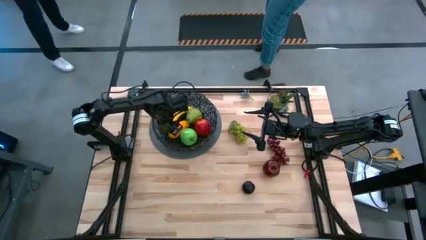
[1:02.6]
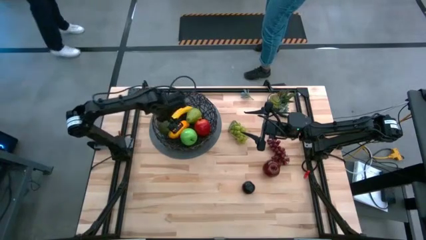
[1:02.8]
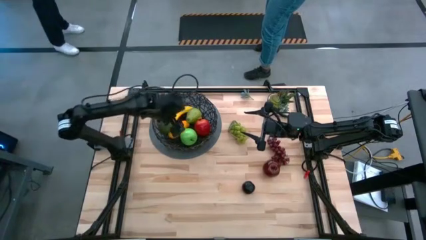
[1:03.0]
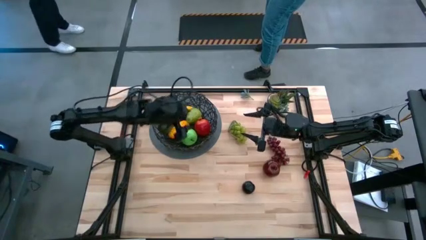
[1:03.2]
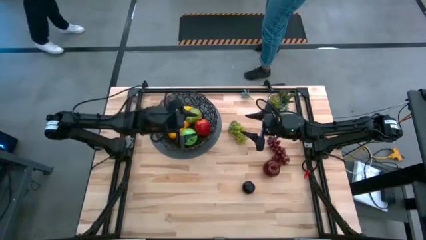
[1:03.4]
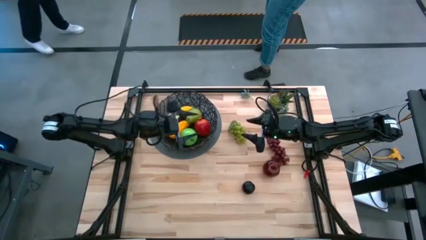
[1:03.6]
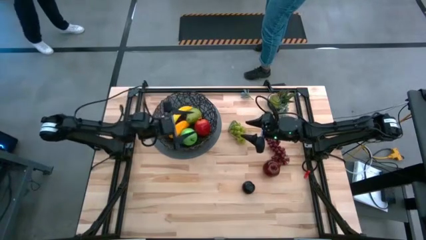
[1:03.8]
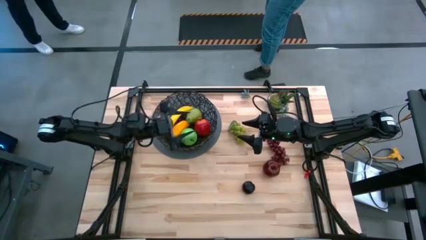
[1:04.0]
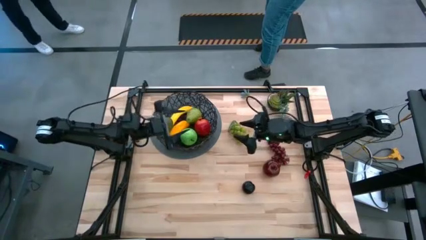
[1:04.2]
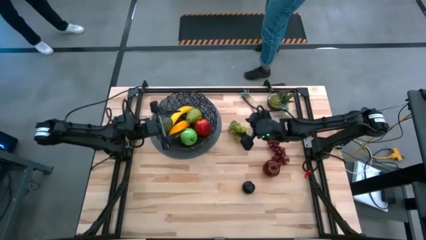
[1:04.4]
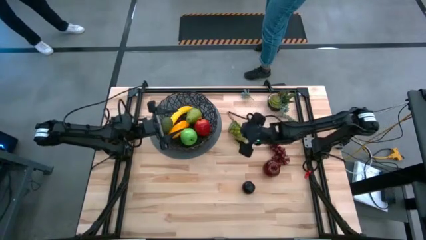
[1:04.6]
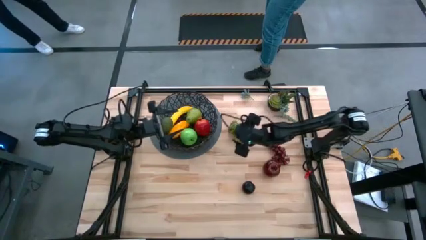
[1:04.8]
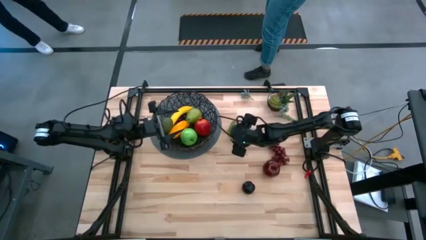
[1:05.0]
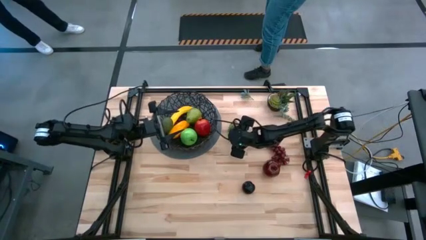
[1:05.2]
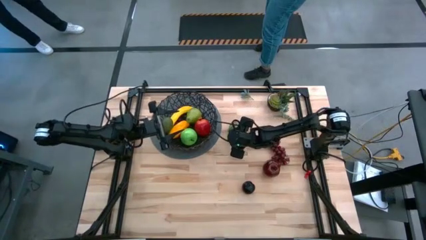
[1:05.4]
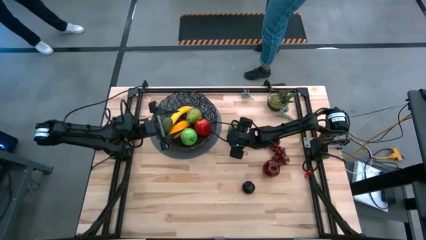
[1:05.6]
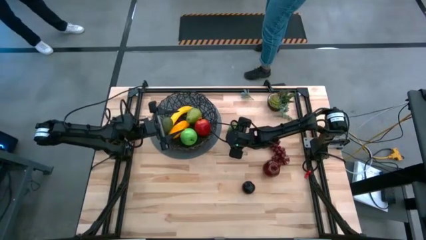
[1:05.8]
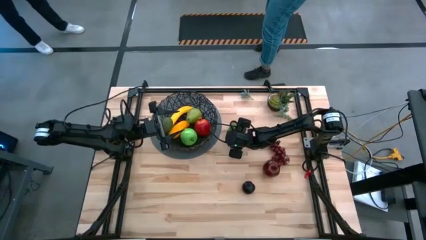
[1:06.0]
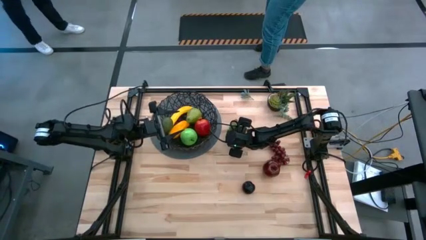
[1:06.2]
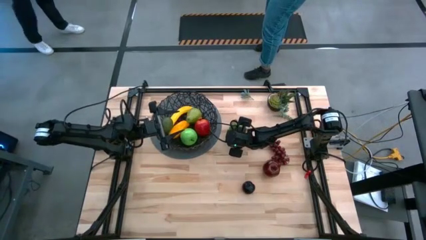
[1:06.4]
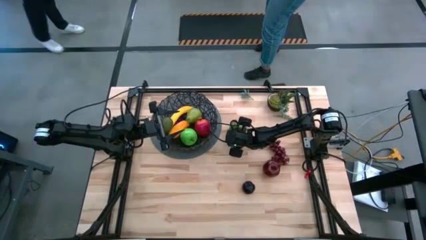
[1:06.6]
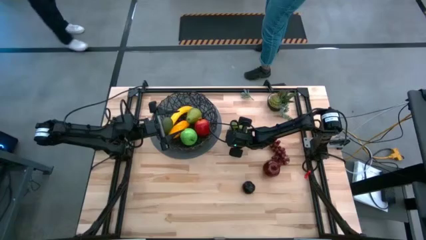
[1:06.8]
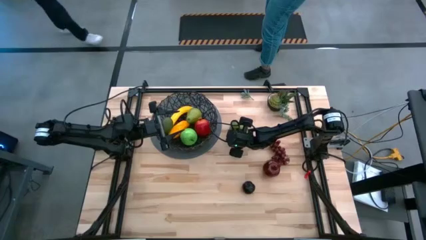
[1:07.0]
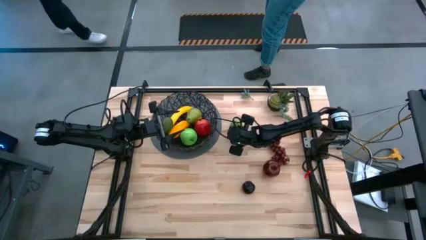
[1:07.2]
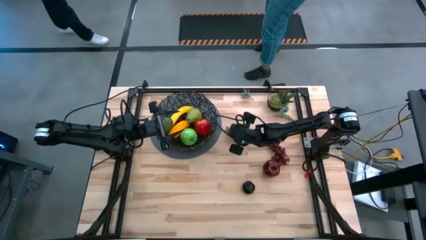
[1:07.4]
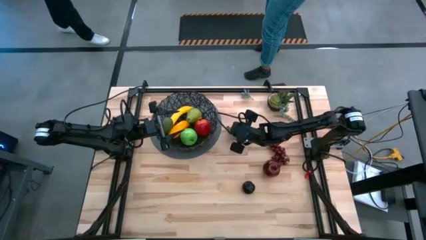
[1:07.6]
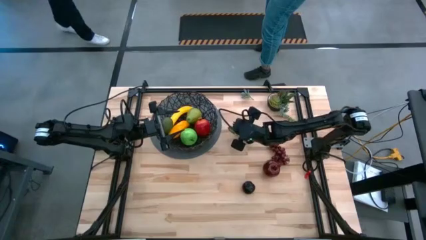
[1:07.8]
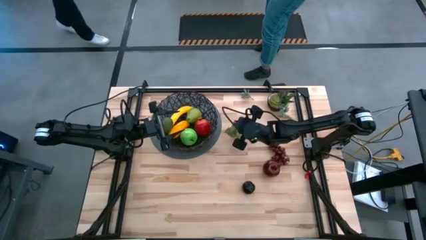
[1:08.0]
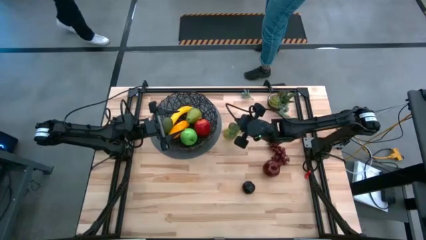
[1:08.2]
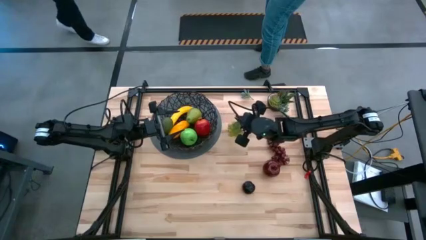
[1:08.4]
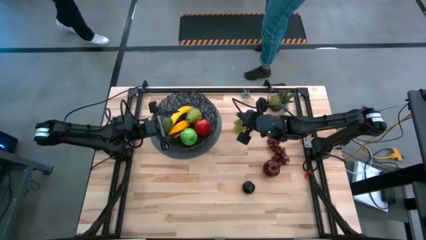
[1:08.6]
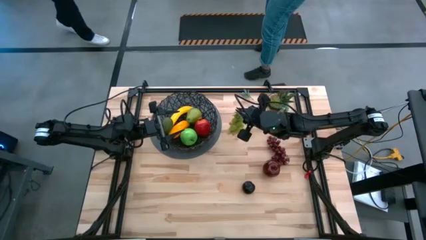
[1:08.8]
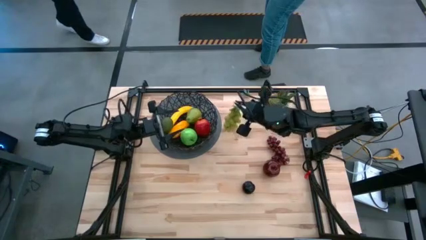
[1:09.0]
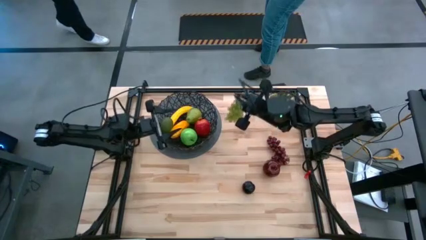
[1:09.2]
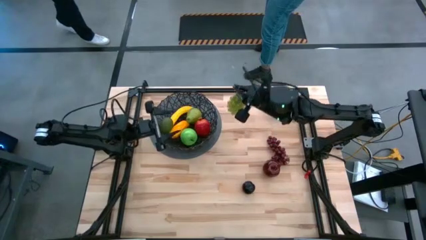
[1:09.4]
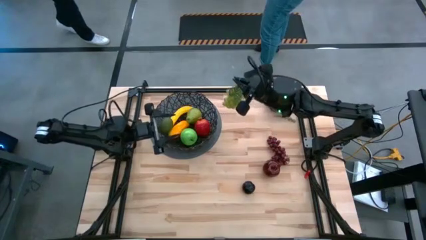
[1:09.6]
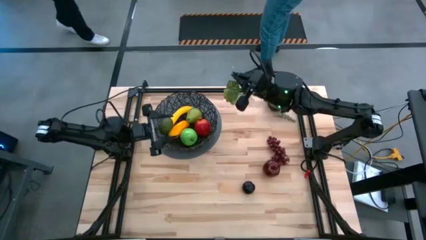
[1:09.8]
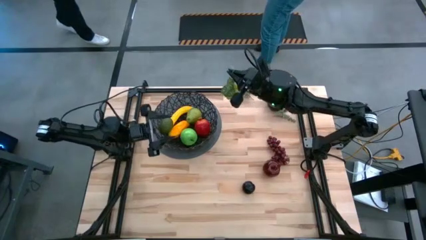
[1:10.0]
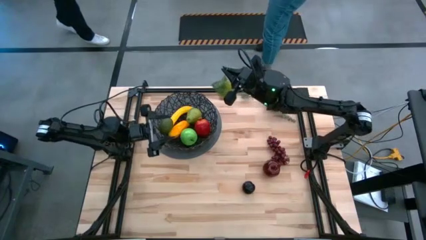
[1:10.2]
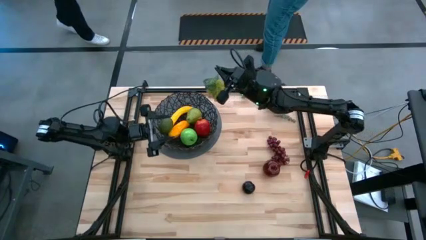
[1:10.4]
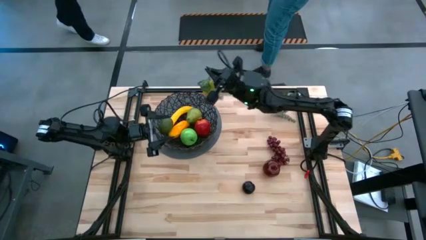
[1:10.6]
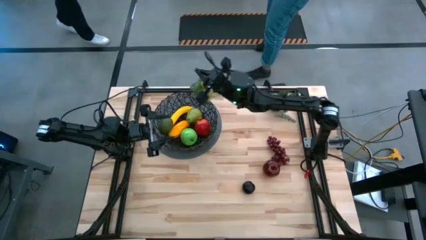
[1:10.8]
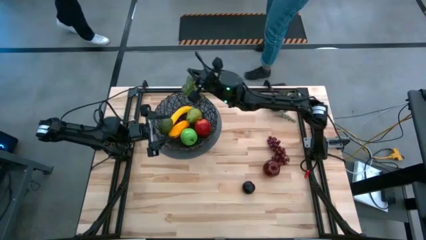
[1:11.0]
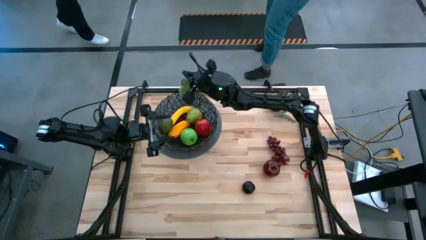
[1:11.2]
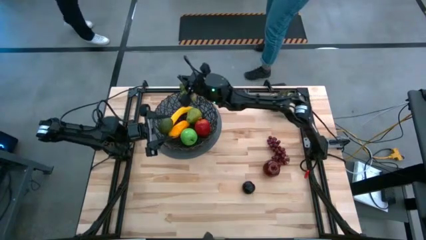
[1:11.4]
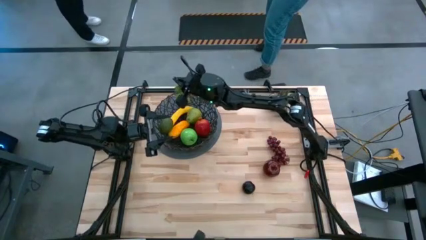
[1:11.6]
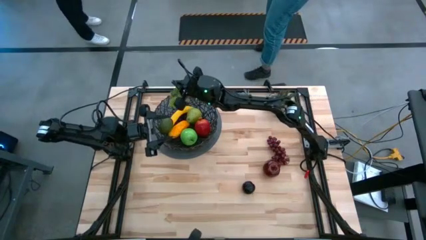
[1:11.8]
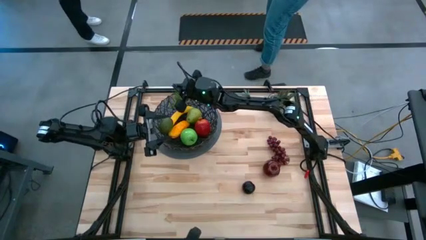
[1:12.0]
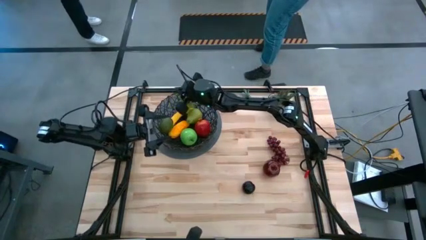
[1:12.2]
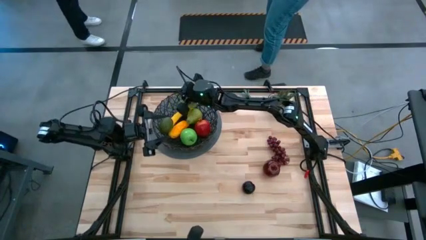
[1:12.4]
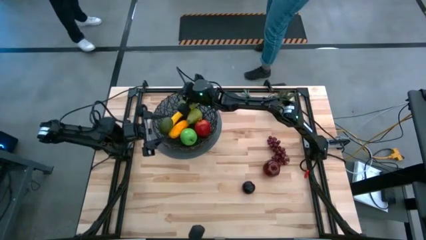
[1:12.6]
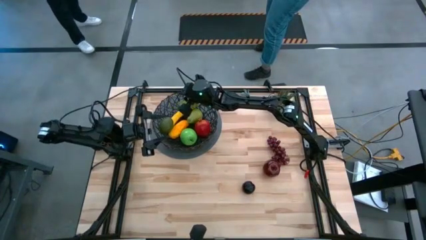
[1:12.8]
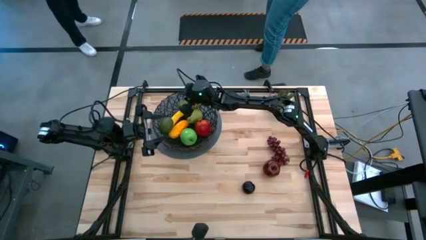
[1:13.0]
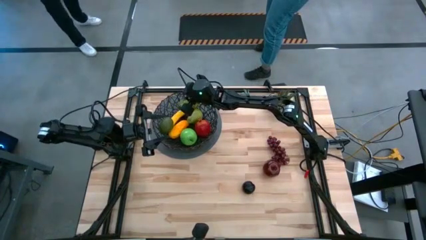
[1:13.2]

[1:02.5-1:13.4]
Task: Build produce basket
Put the green grapes into the basket
